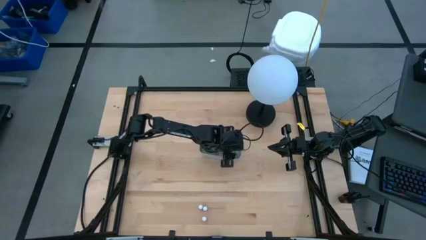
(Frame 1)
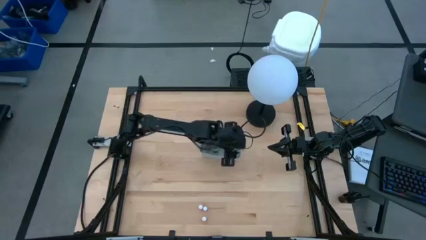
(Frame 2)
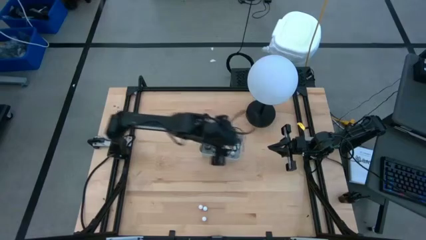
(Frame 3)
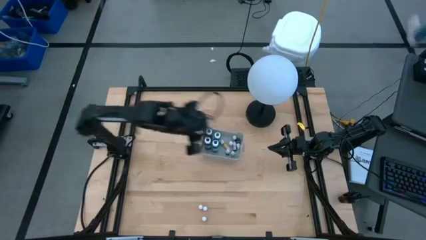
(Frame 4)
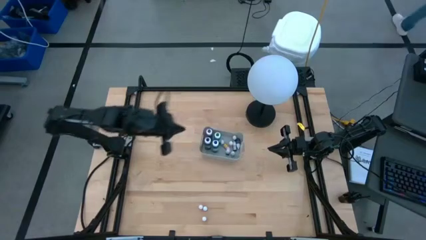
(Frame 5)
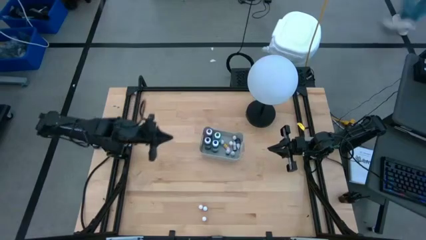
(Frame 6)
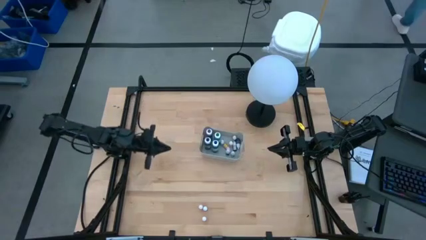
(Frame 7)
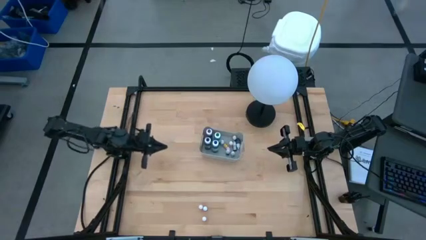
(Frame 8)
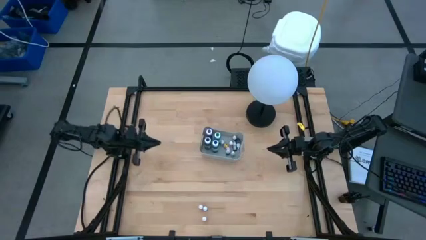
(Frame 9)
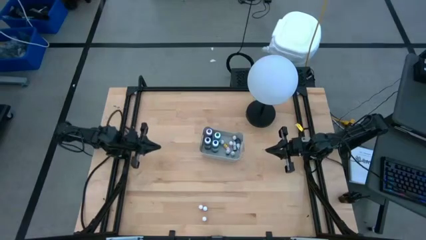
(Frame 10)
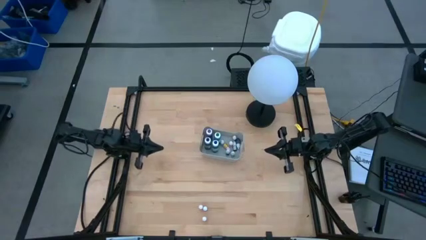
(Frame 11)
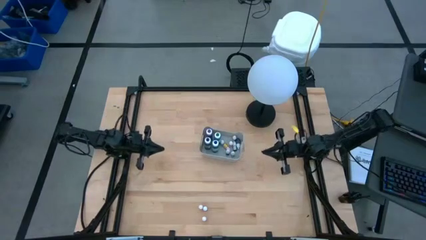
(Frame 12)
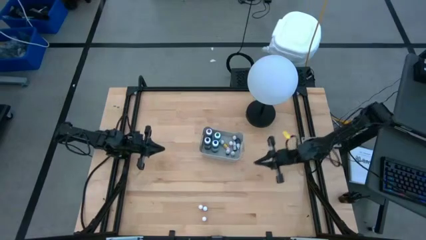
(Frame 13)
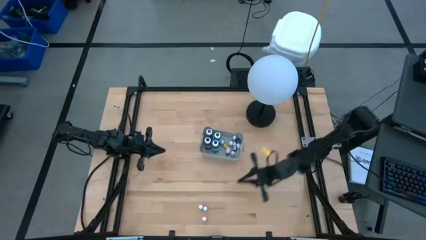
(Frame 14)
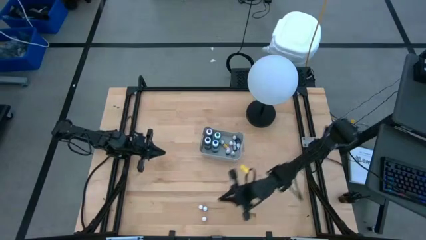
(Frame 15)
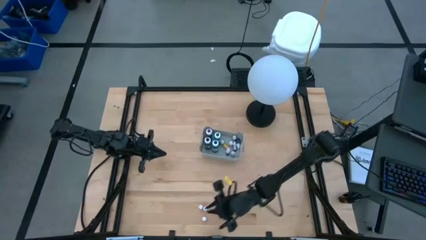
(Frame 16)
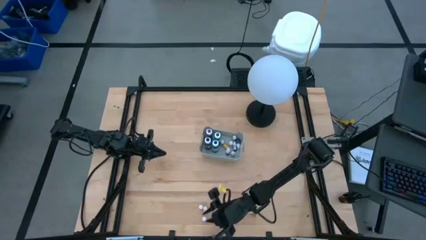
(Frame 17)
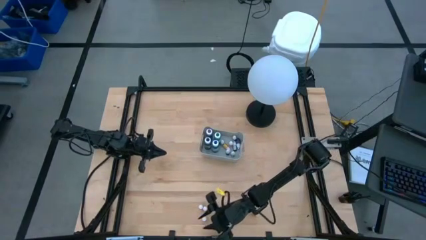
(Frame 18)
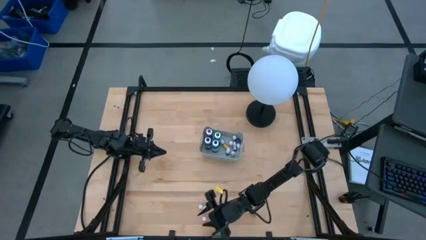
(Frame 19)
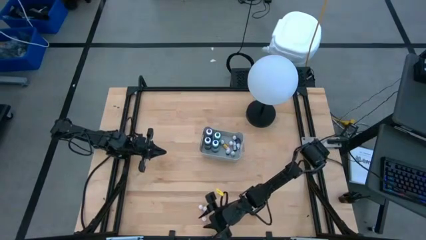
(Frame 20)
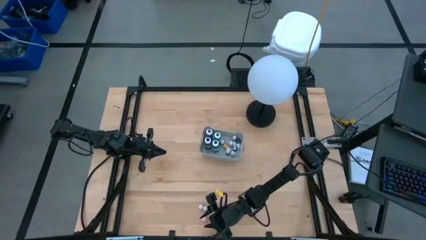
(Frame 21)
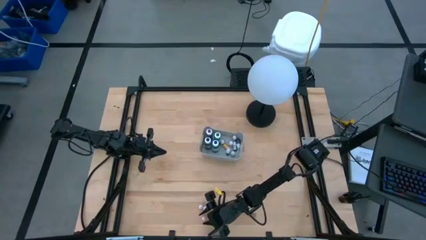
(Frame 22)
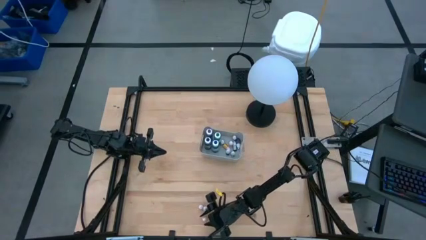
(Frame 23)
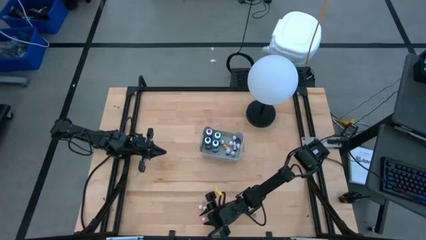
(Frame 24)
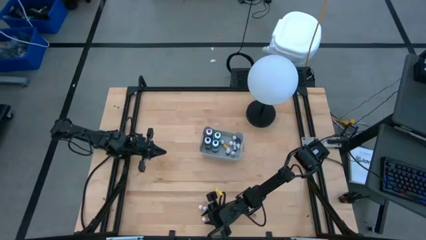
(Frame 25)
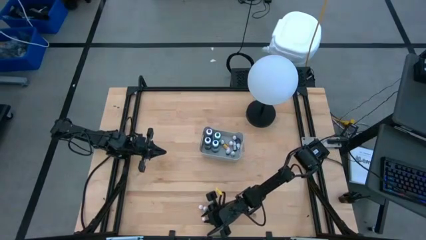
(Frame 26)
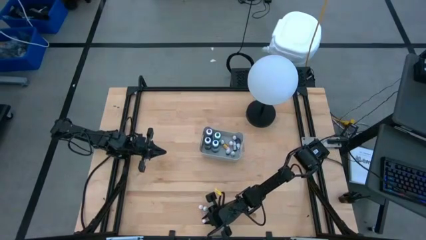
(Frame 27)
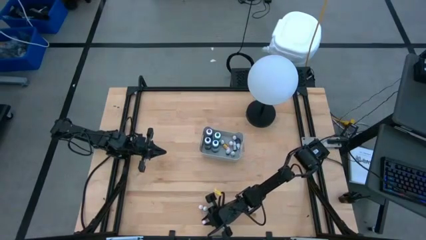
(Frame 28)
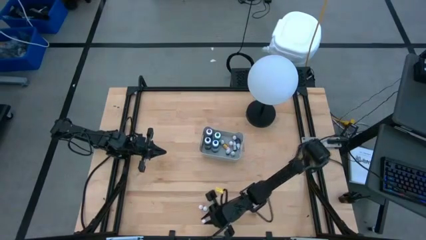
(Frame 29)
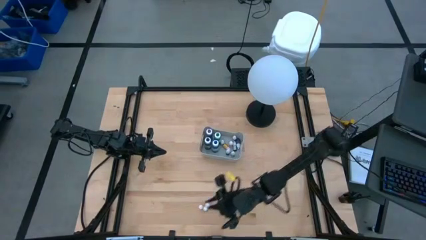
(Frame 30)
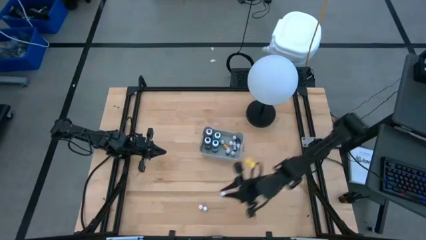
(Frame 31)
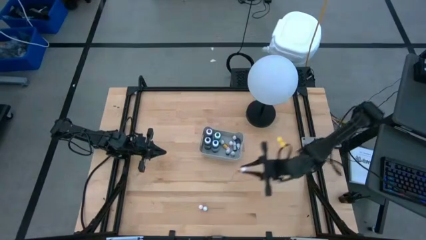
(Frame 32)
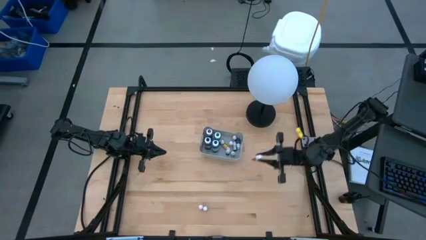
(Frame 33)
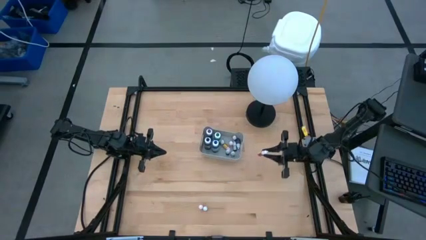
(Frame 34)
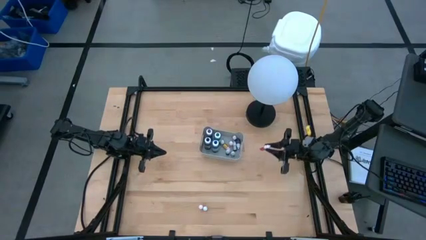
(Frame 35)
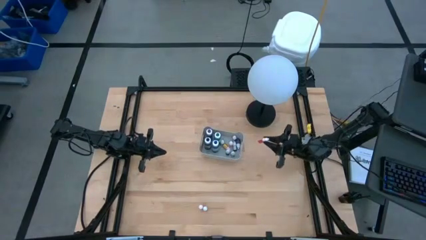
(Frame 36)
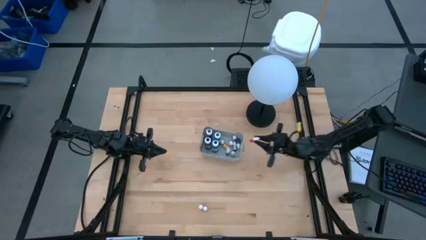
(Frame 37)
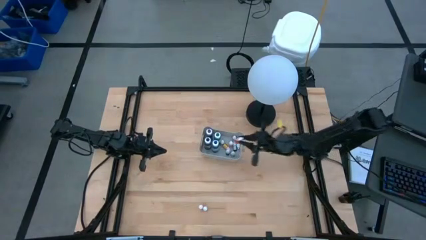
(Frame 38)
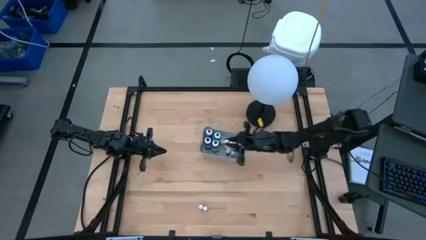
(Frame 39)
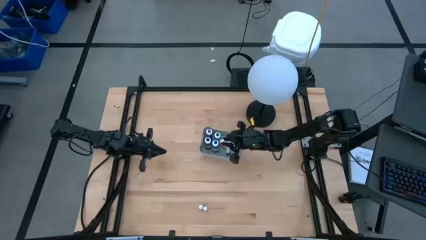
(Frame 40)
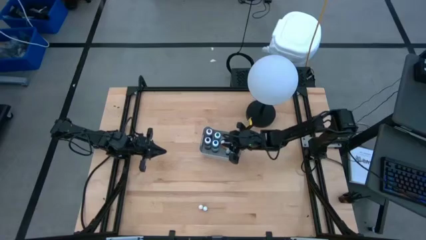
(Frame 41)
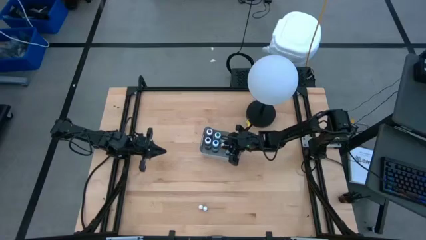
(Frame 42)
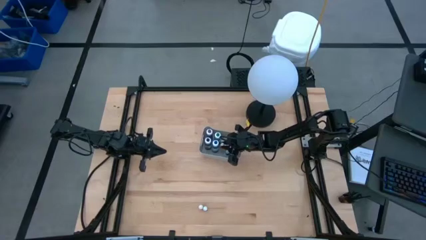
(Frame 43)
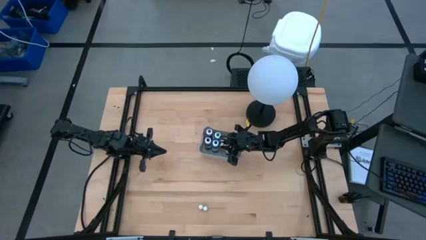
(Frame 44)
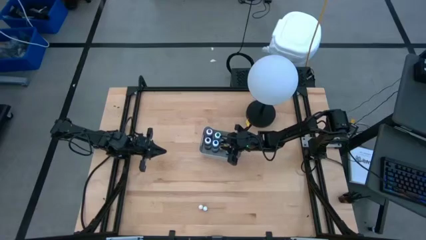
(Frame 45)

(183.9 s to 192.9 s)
Task: Pick & Place food coloring
Put the small orange food coloring bottle into the gray bin

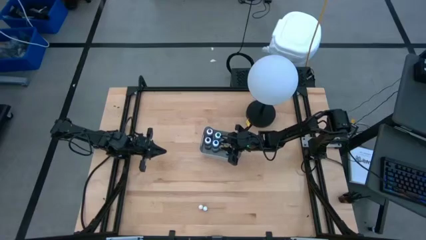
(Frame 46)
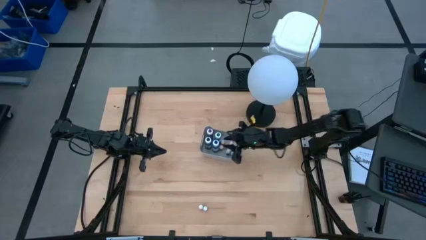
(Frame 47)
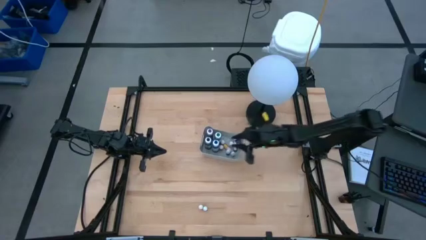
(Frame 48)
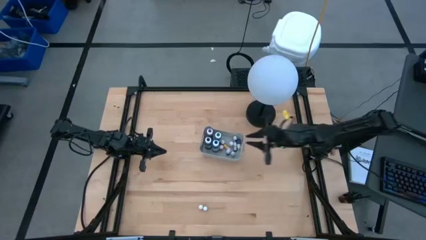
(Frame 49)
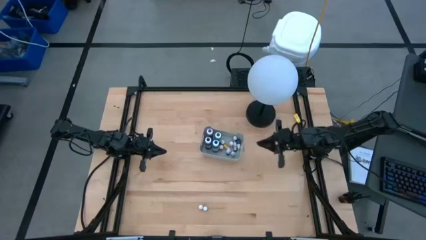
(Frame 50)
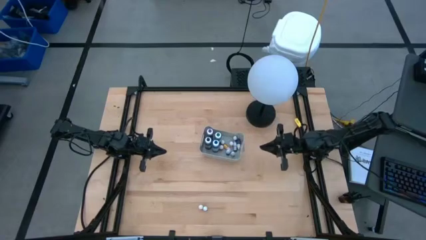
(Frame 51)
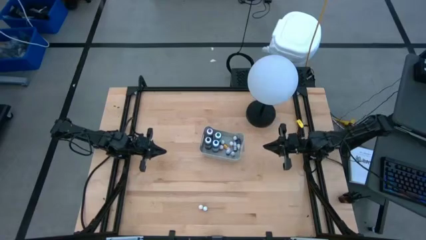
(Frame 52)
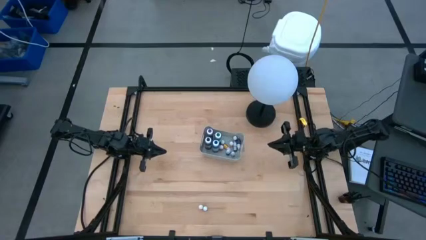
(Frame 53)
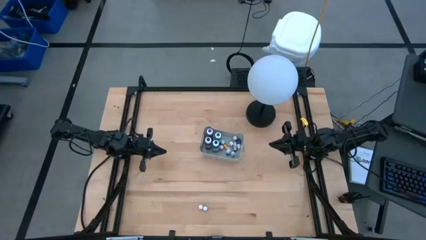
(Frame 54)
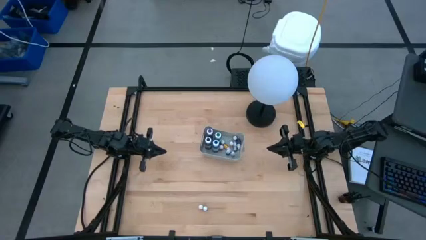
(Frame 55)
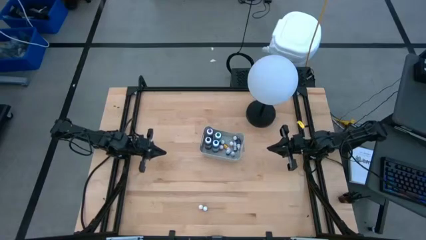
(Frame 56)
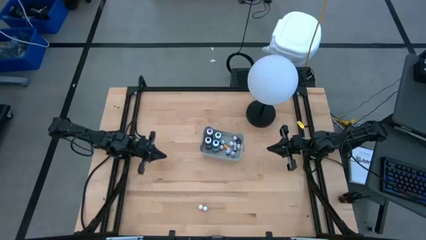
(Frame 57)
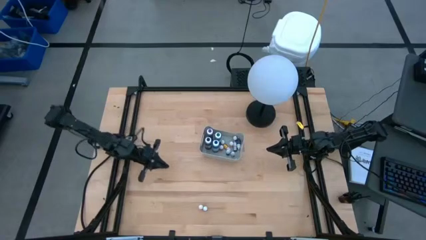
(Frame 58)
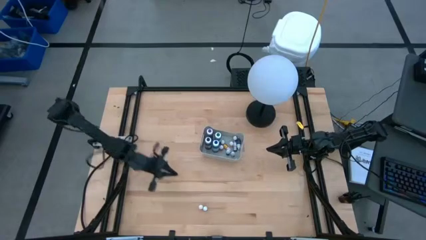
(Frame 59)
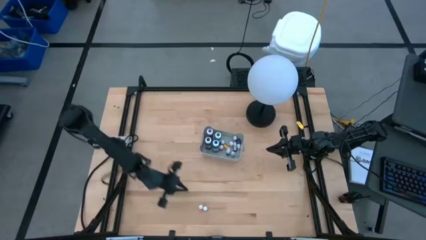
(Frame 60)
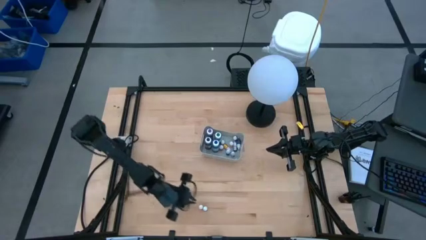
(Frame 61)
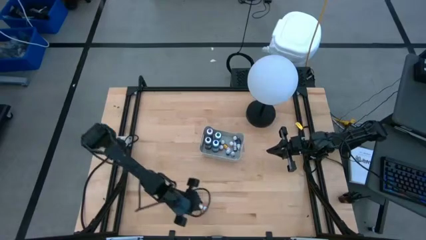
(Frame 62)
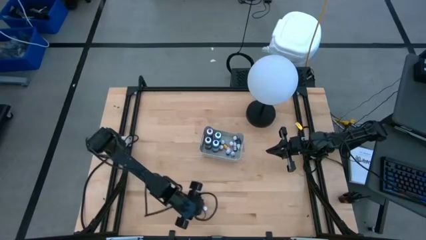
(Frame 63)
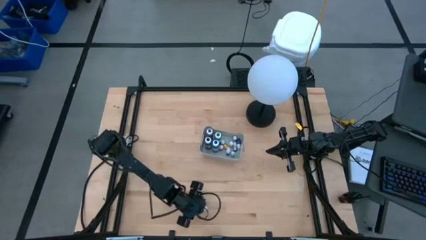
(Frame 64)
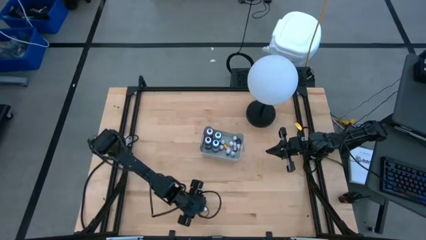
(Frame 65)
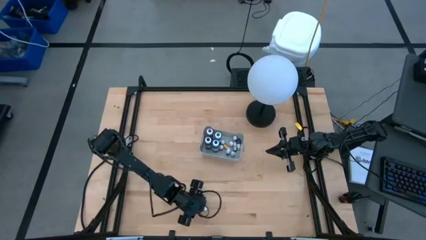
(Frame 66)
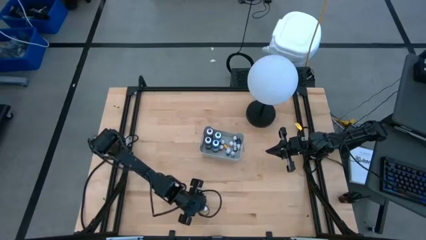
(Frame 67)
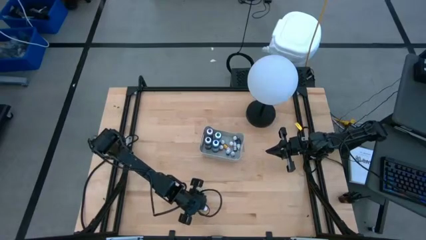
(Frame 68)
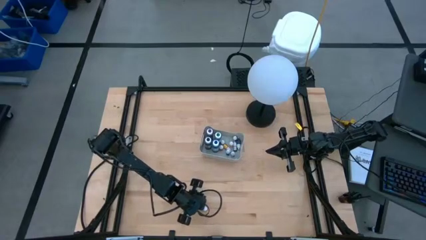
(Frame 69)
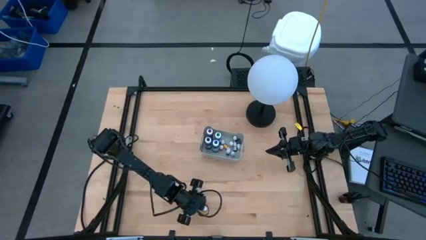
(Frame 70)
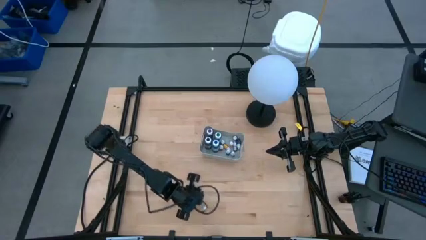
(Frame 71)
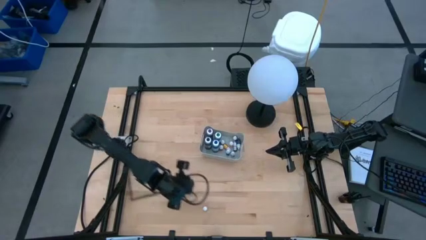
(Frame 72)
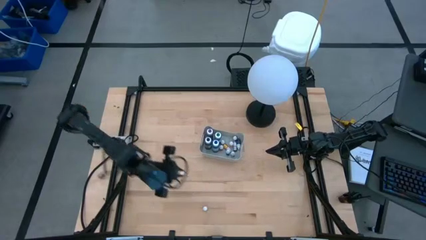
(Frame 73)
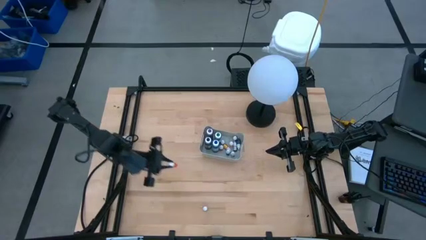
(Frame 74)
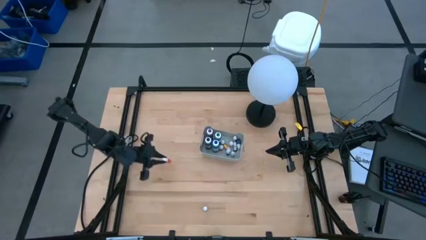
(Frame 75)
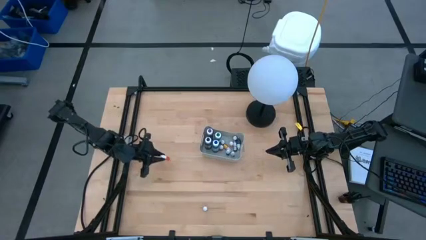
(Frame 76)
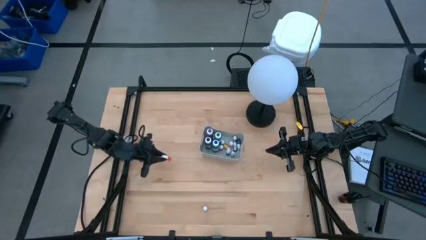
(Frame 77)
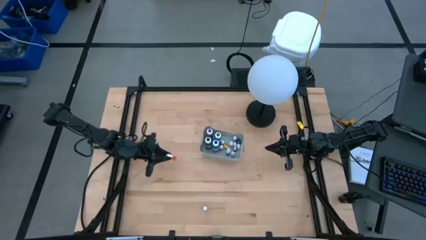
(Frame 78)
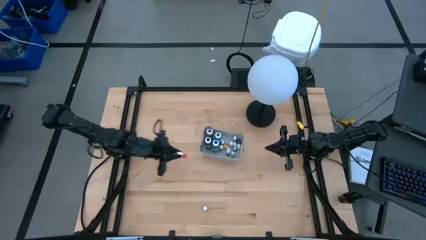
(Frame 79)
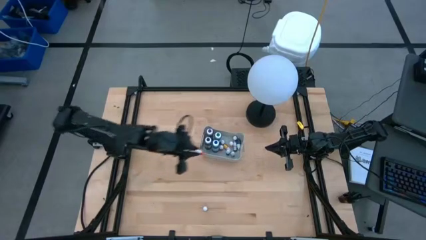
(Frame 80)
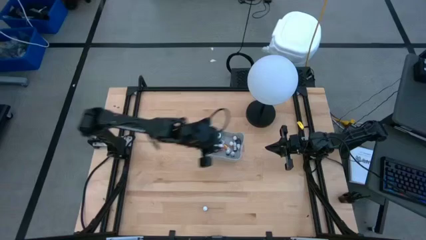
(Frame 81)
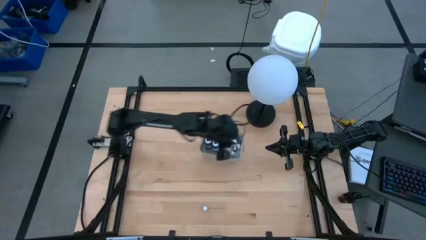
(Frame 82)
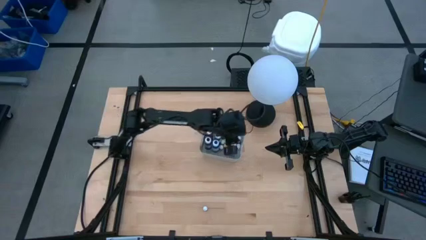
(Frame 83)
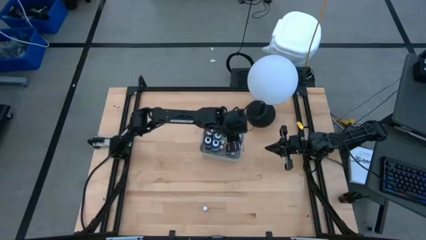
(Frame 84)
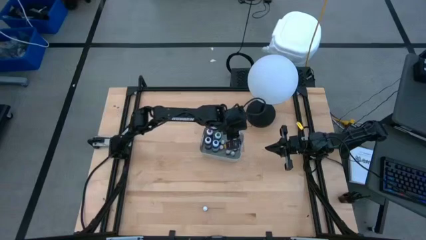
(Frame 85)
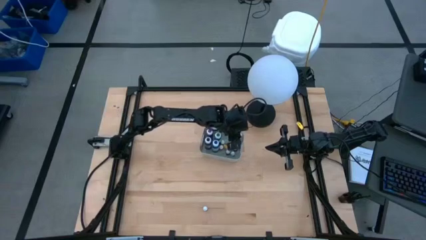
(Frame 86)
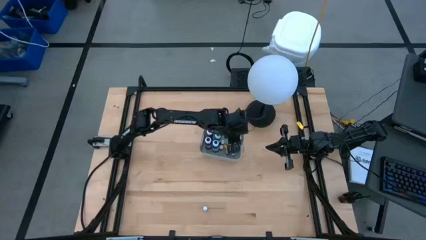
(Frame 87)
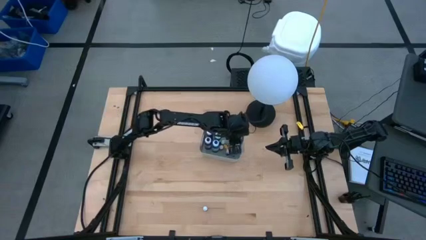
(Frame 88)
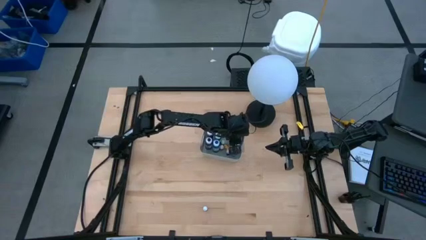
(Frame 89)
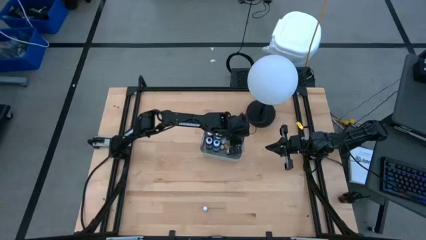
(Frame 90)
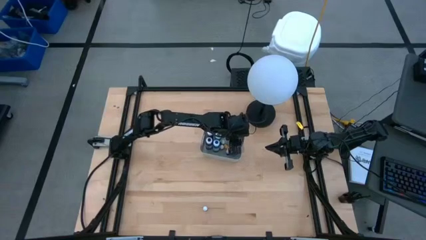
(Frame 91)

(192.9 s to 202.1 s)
Put the small orange food coloring bottle into the gray bin
